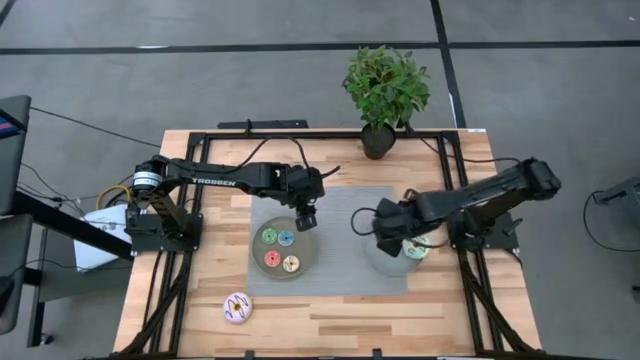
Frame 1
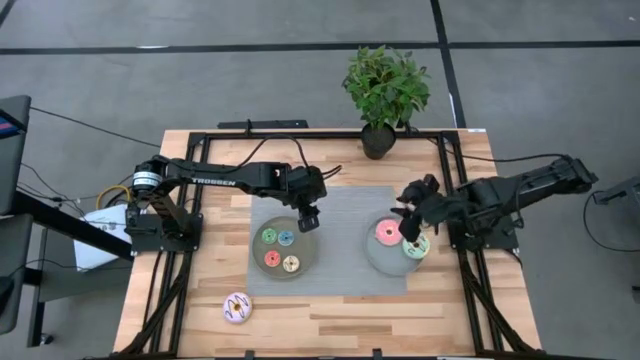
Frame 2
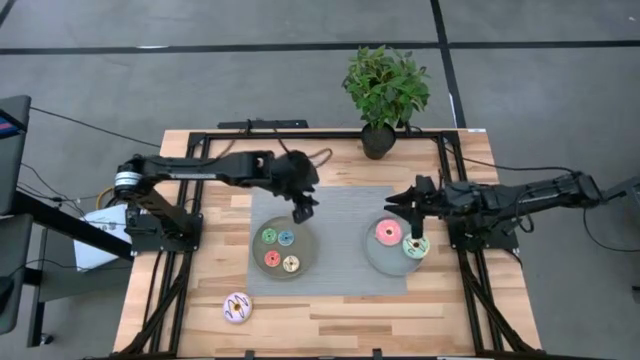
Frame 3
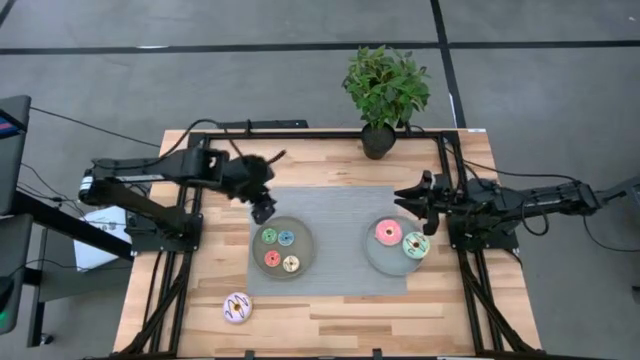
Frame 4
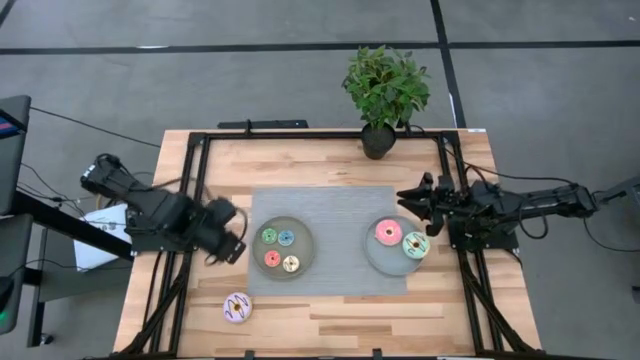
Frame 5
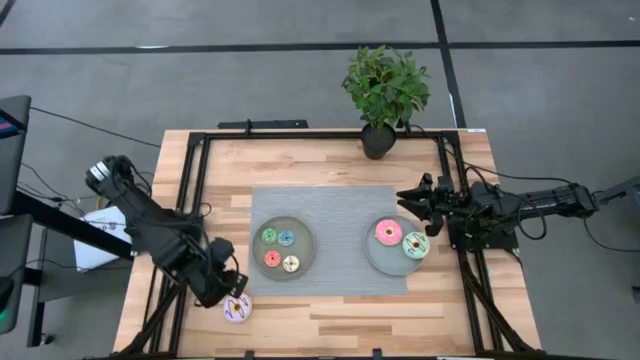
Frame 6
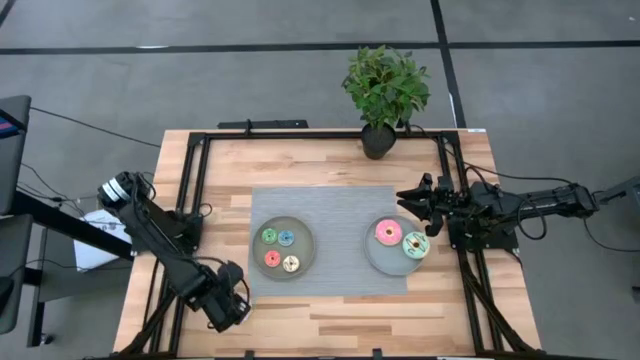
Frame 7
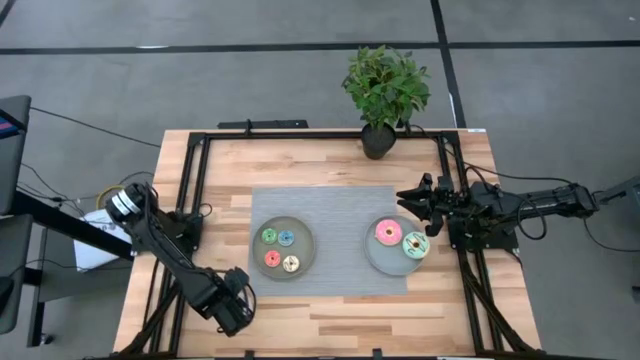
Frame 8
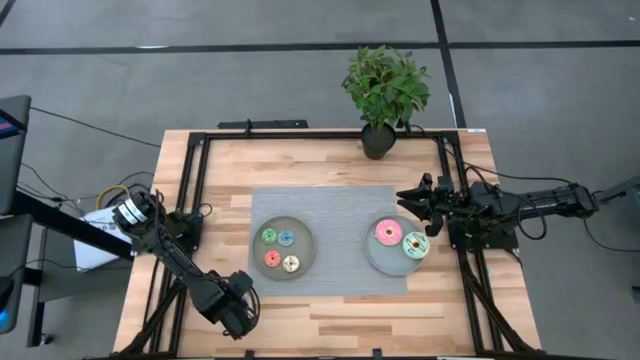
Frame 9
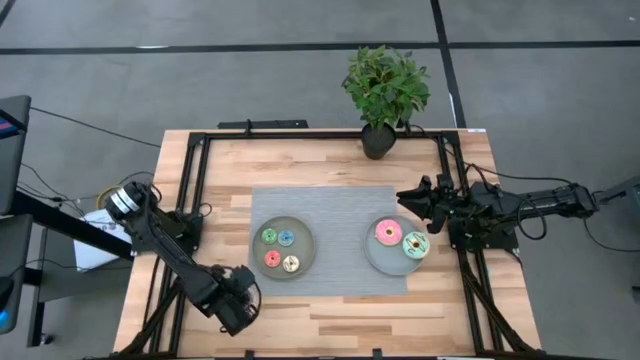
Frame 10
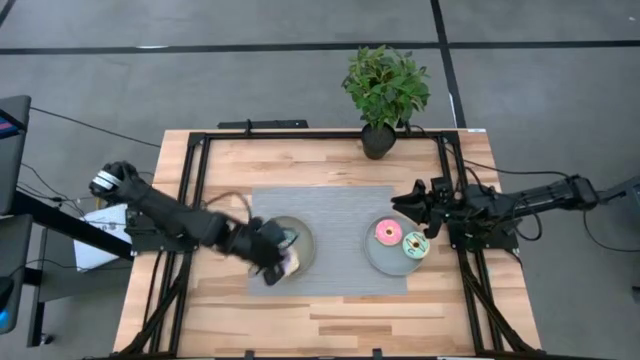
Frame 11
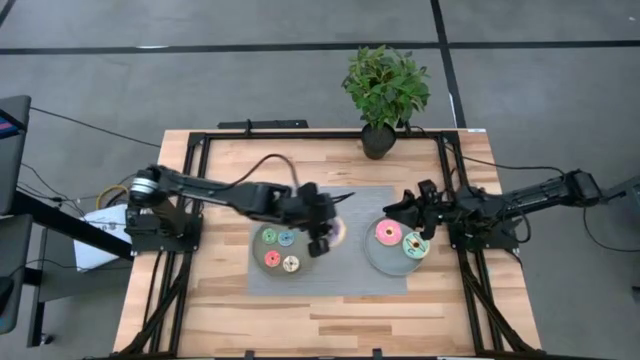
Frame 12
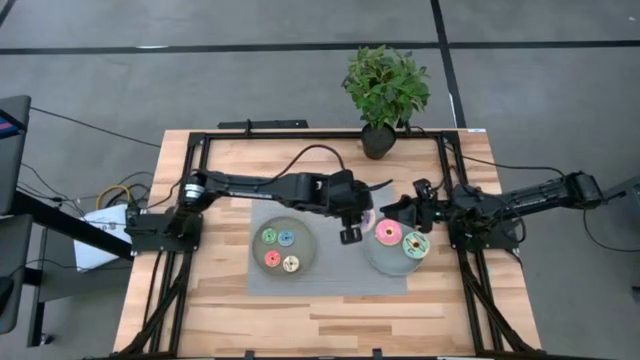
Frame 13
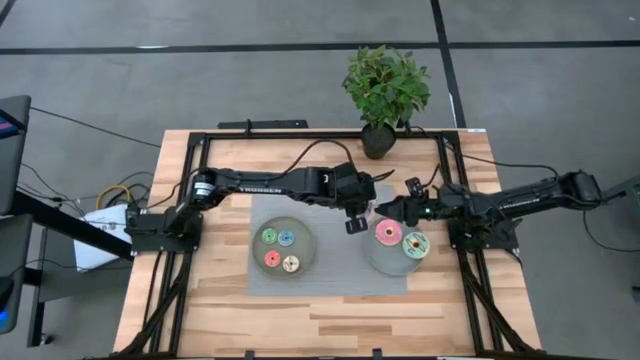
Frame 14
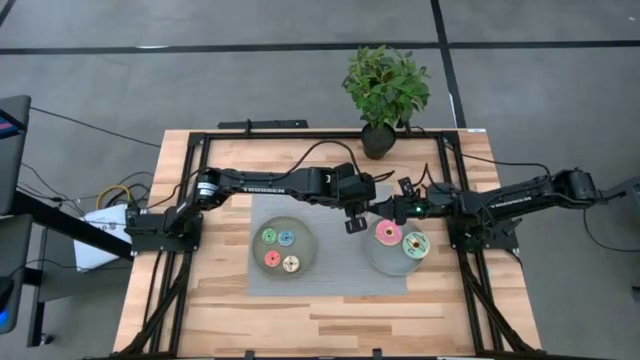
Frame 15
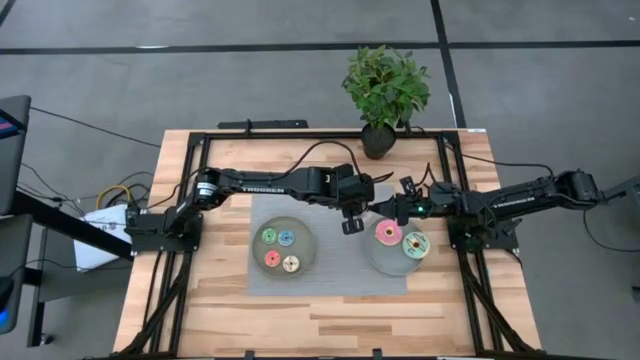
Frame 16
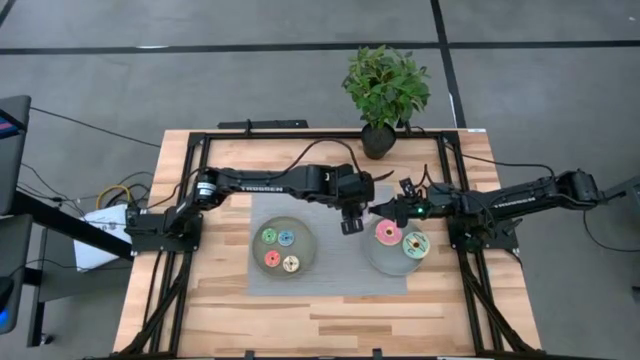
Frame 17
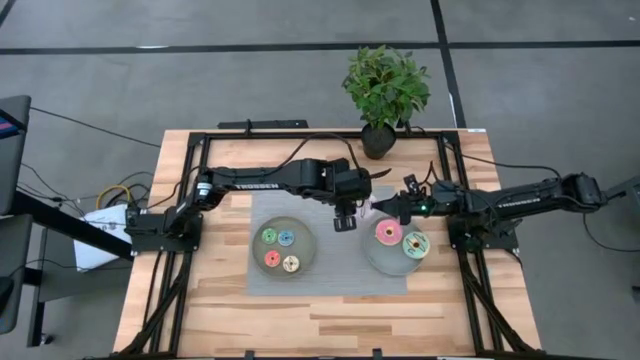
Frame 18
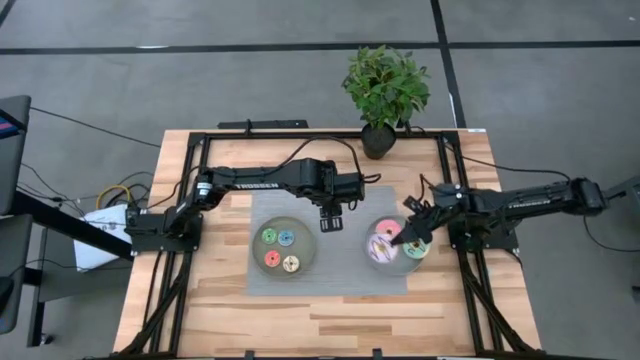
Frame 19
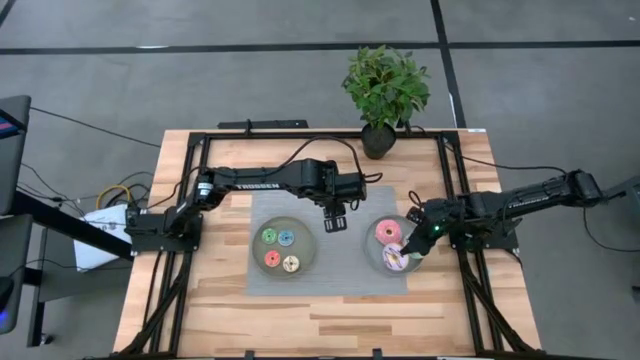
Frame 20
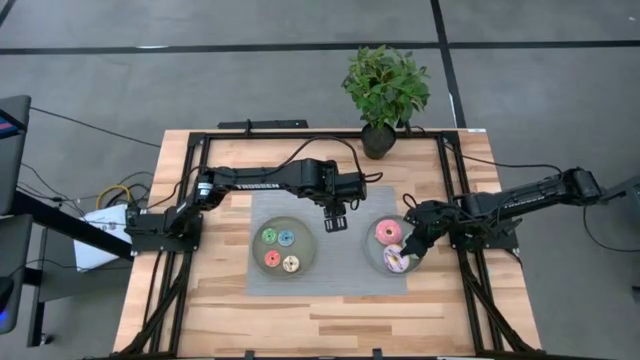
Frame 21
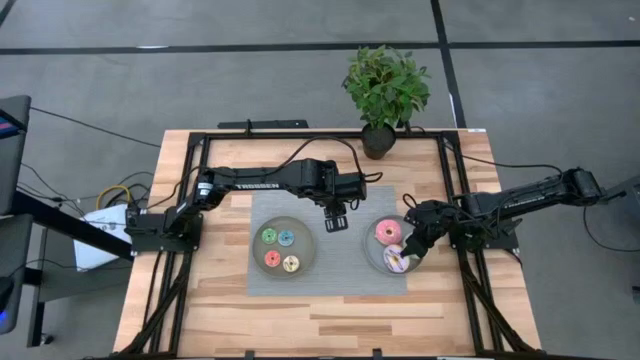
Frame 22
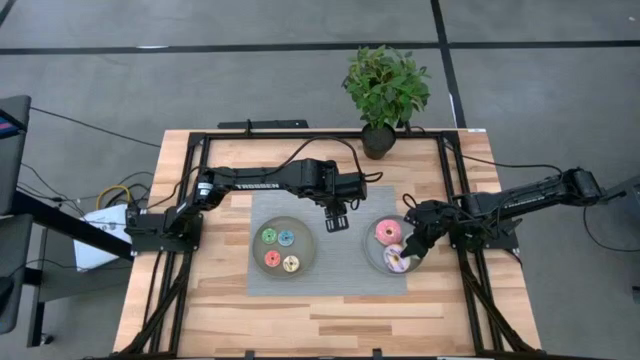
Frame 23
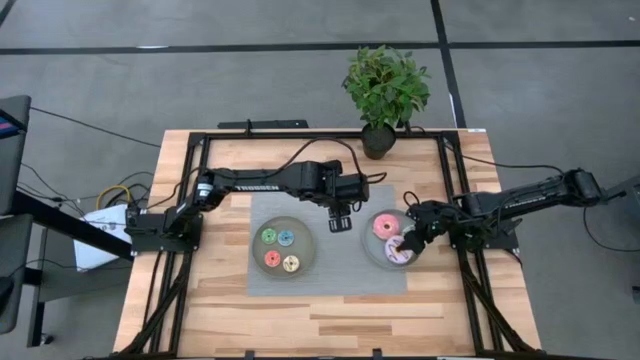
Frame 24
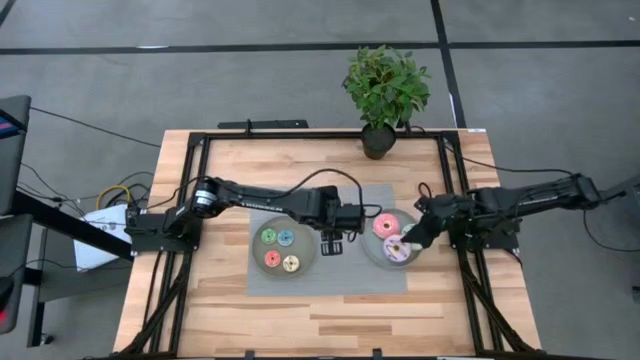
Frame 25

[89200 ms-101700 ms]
Task: Pick & Place donuts
Put the large purple donut on the gray plate

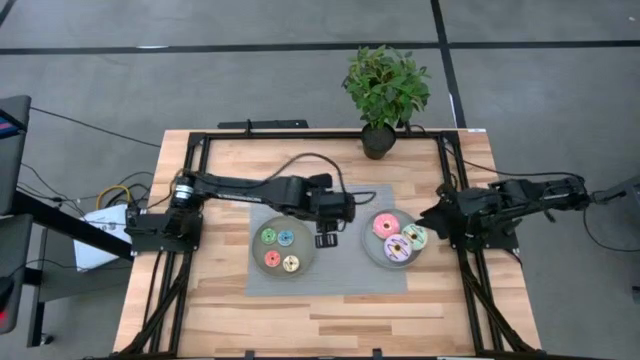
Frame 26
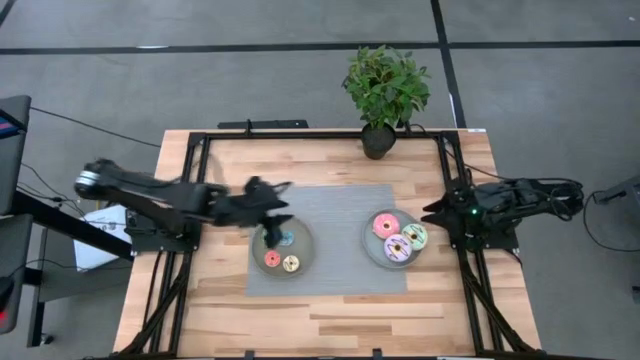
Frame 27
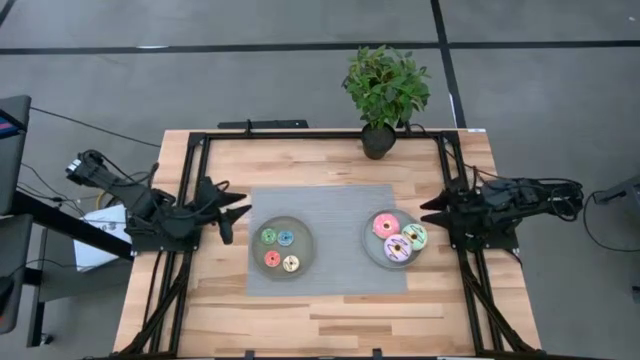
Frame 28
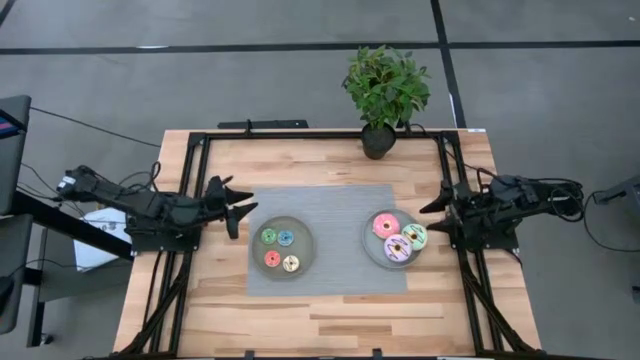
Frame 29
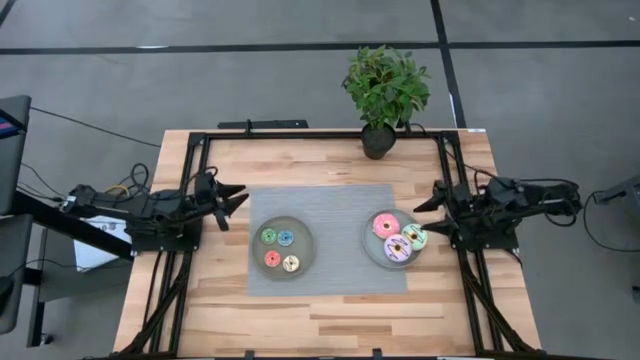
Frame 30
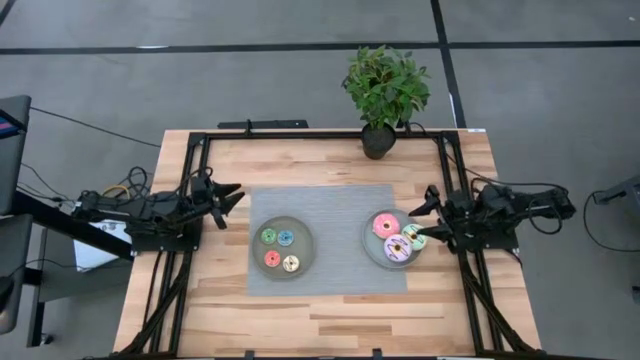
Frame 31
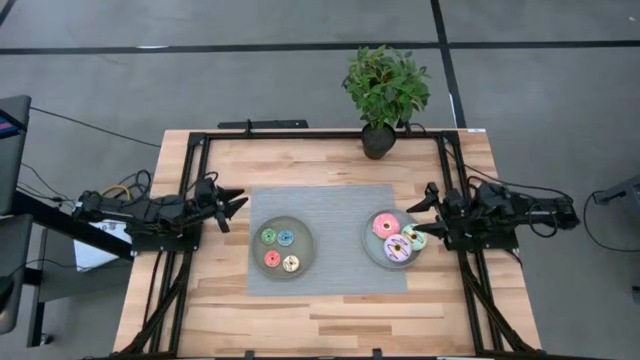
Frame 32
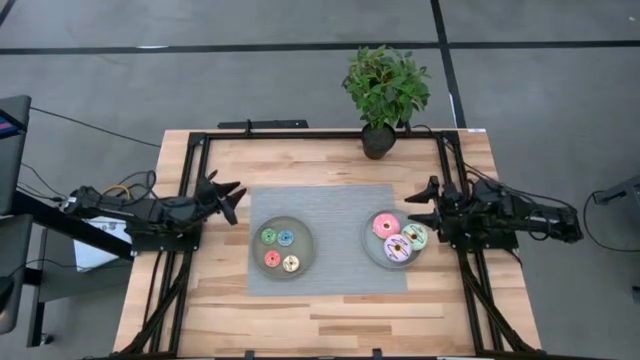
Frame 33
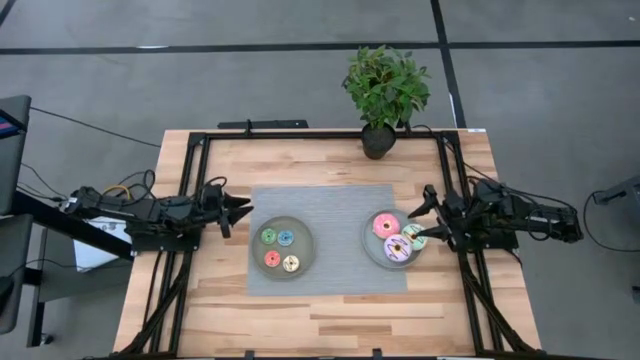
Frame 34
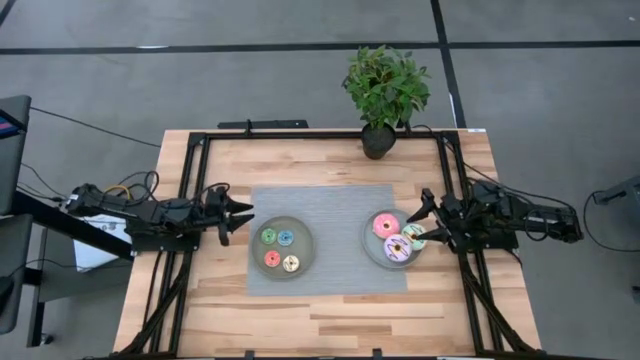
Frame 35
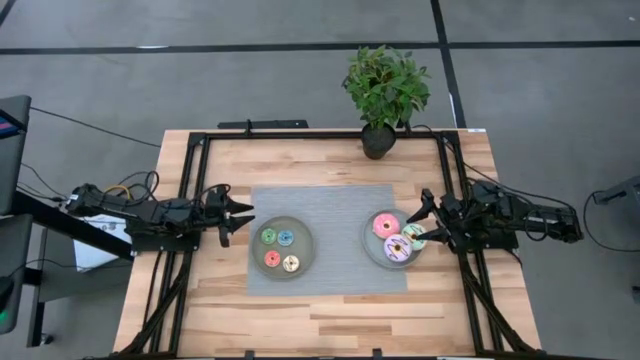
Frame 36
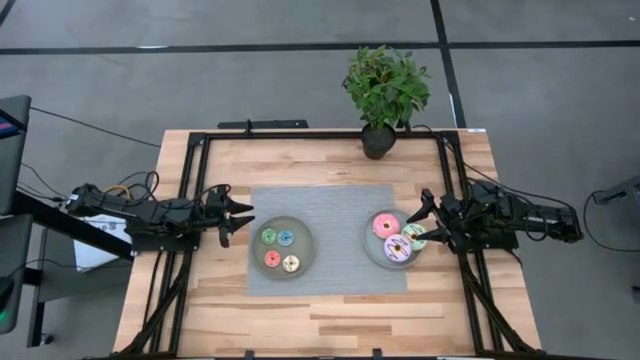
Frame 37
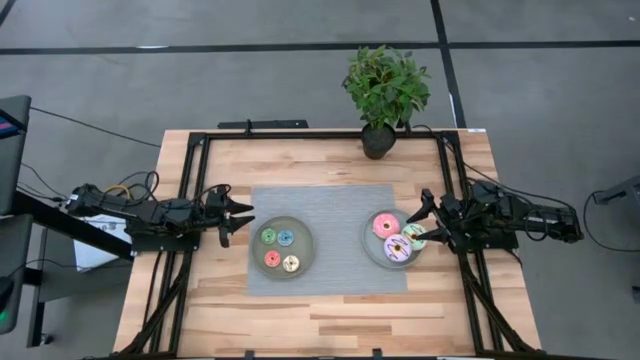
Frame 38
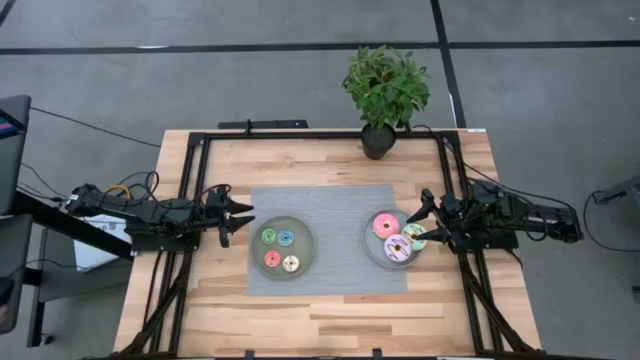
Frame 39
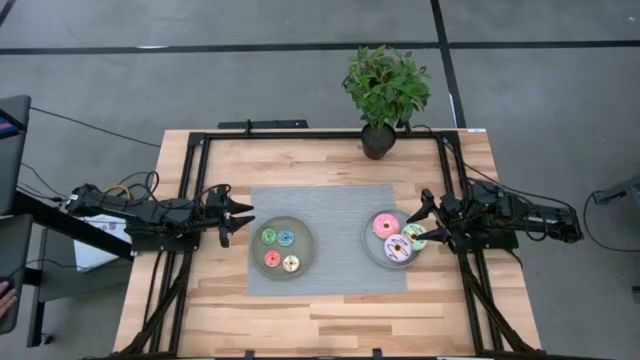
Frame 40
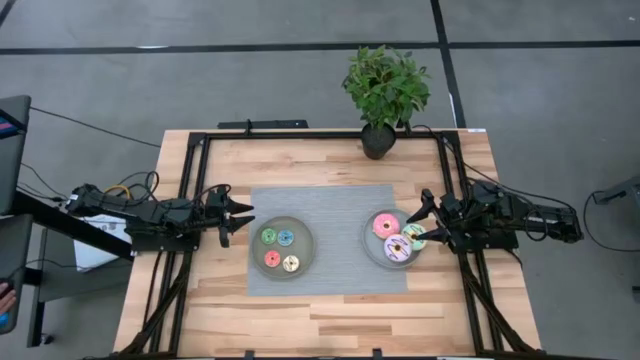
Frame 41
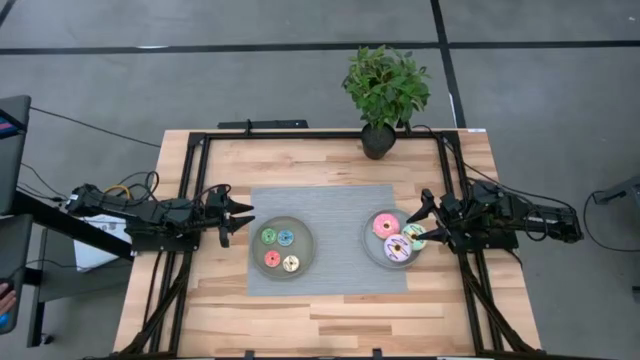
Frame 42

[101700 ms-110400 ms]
Return to Home Position
